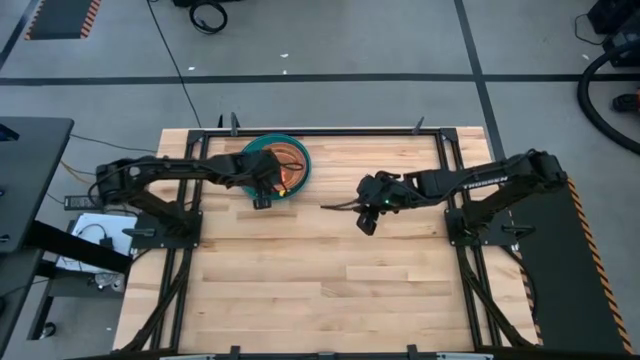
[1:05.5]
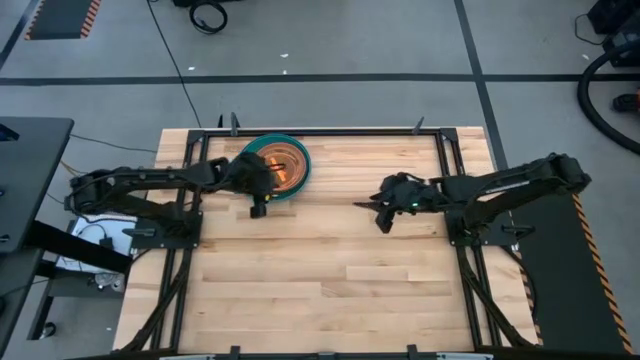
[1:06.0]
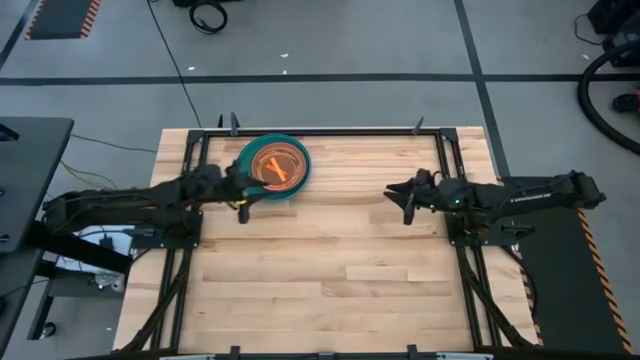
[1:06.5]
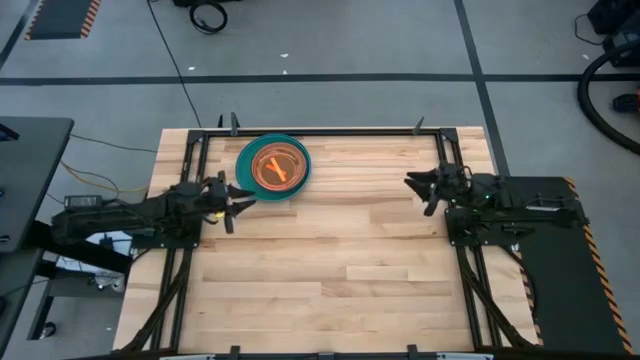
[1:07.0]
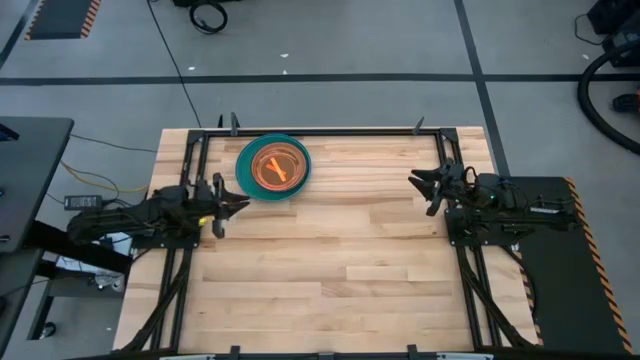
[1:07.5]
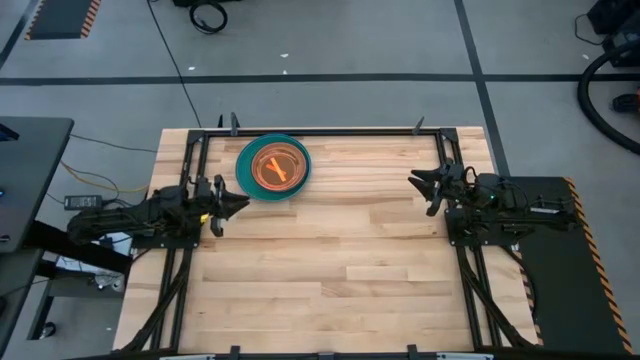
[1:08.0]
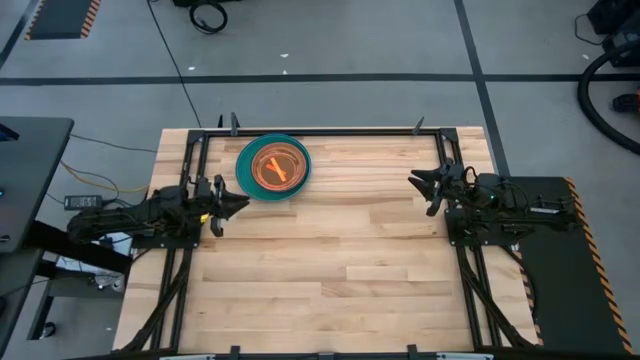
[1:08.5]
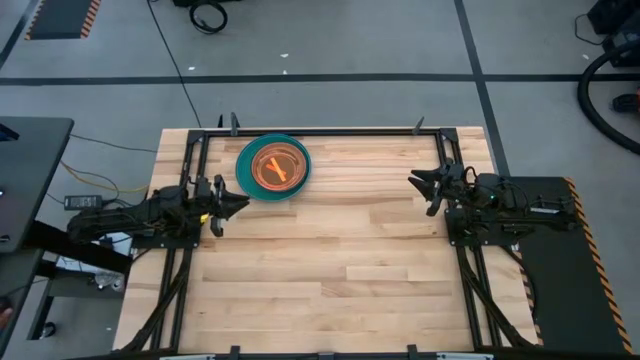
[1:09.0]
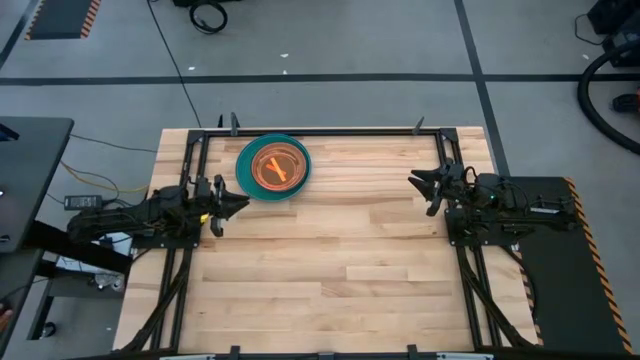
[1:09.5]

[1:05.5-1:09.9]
Task: Stack plastic plates
Return to Home Position

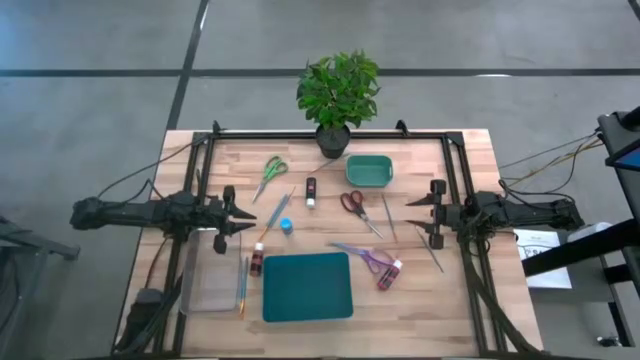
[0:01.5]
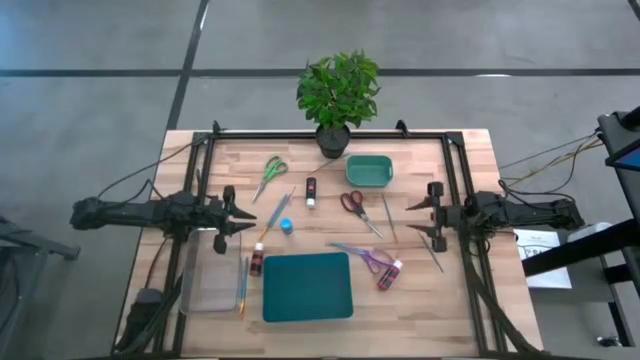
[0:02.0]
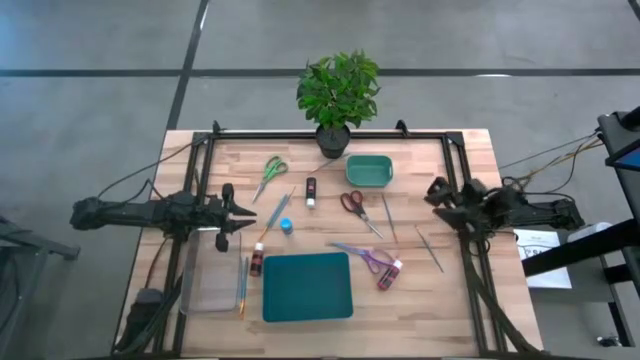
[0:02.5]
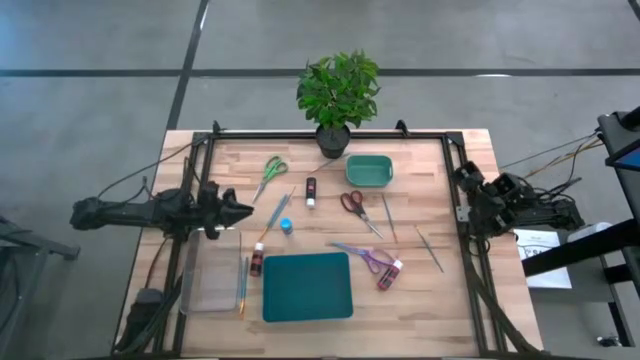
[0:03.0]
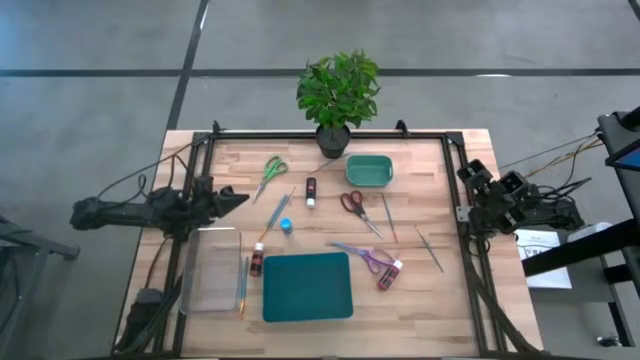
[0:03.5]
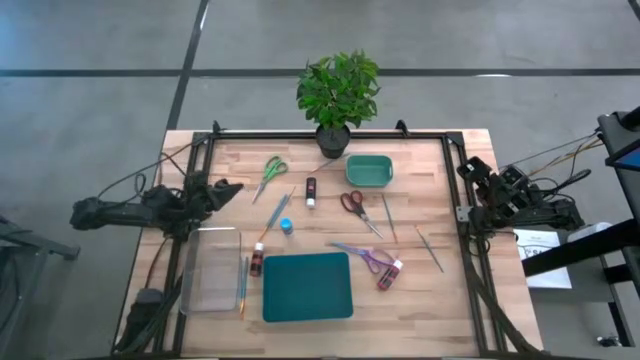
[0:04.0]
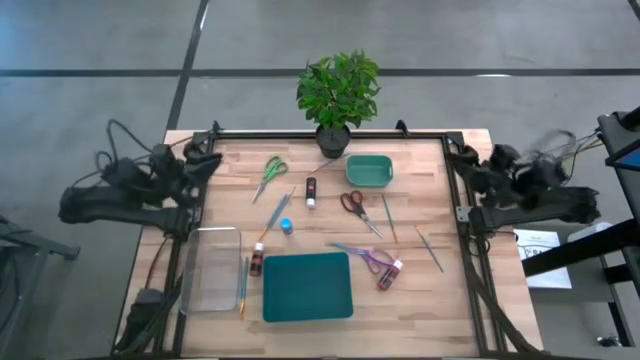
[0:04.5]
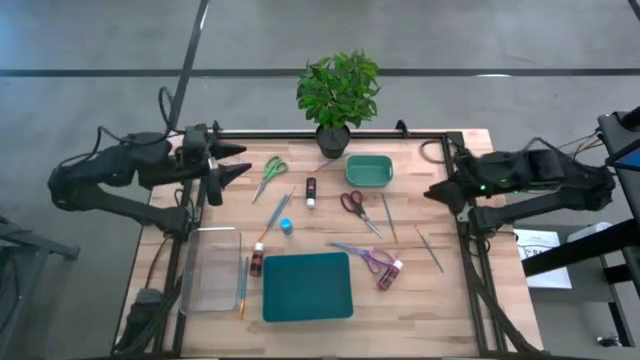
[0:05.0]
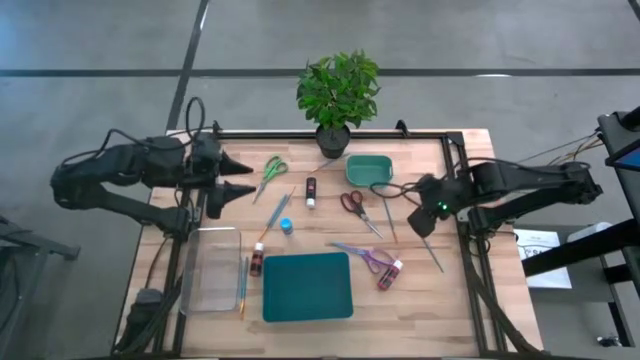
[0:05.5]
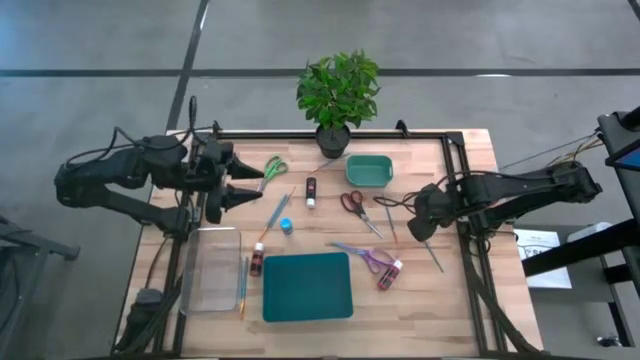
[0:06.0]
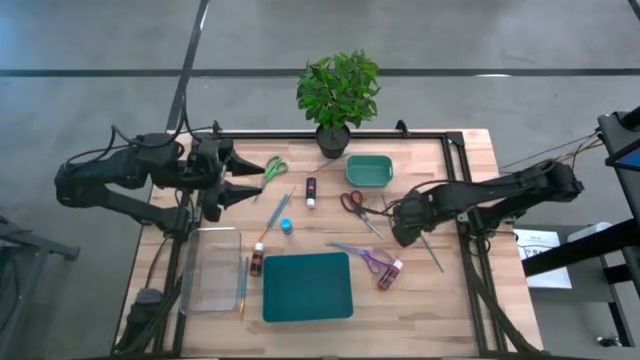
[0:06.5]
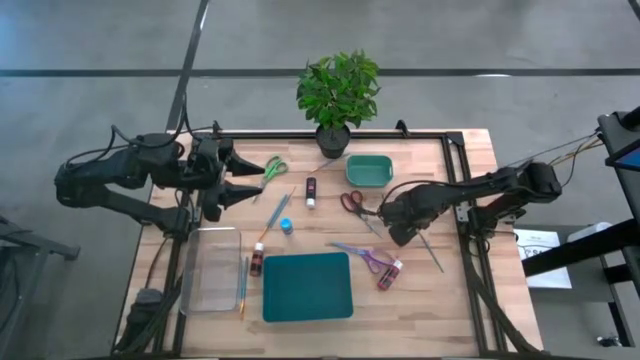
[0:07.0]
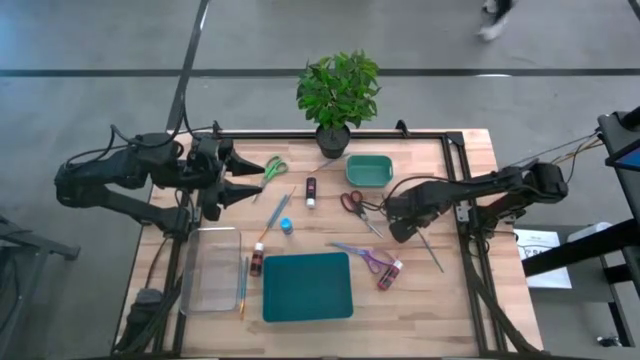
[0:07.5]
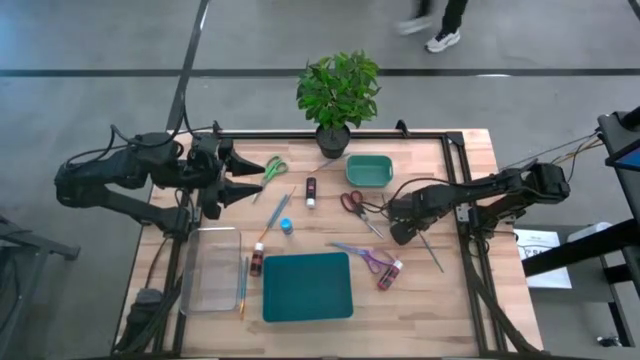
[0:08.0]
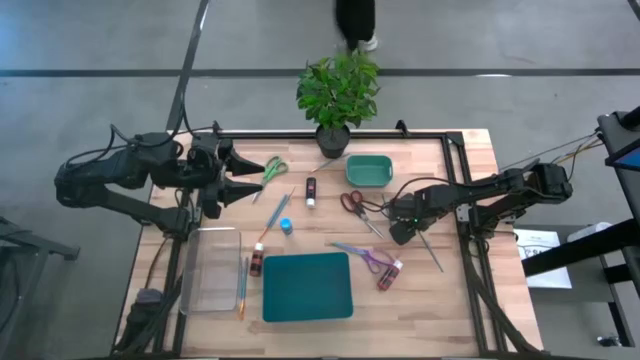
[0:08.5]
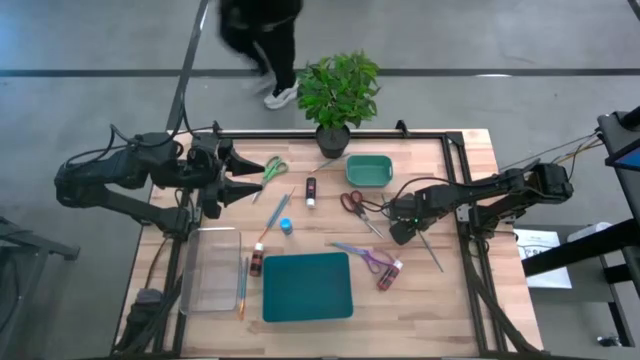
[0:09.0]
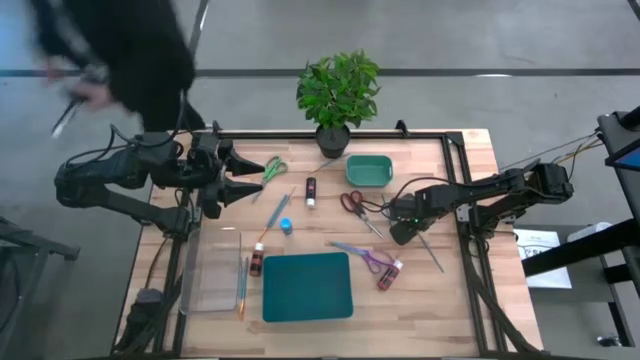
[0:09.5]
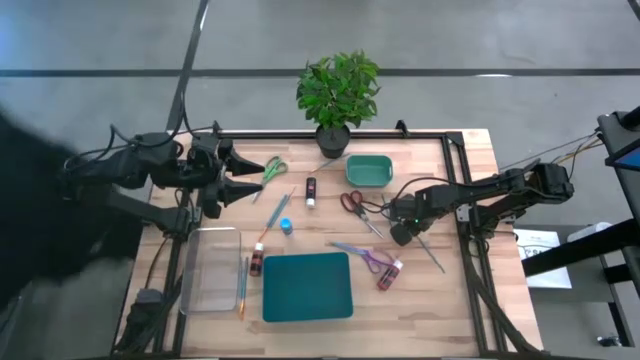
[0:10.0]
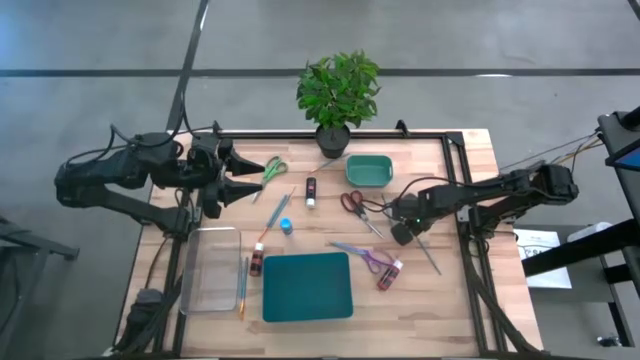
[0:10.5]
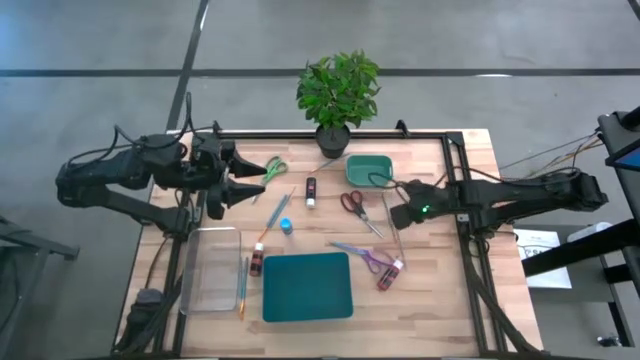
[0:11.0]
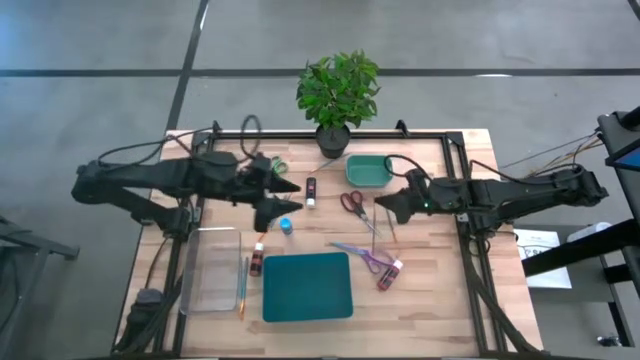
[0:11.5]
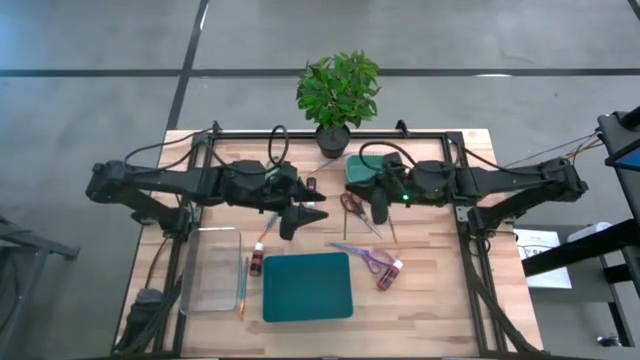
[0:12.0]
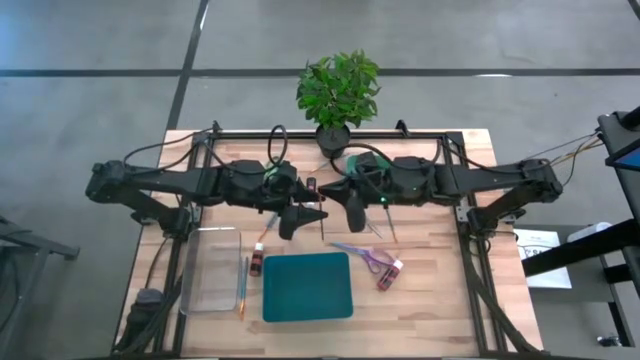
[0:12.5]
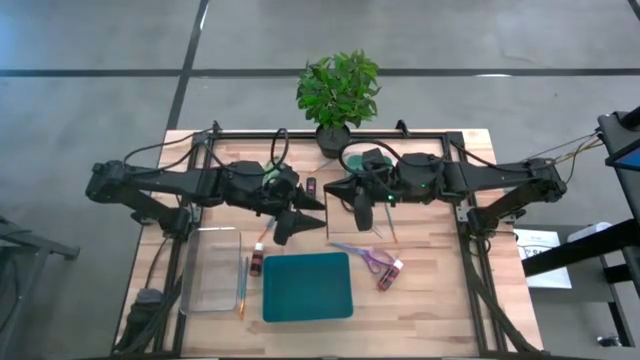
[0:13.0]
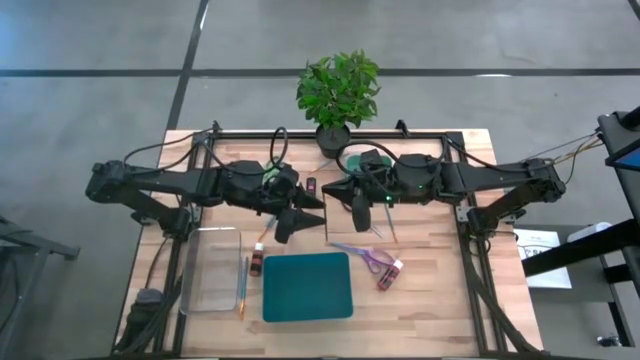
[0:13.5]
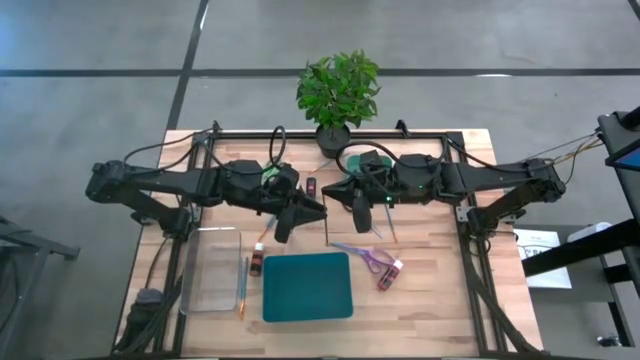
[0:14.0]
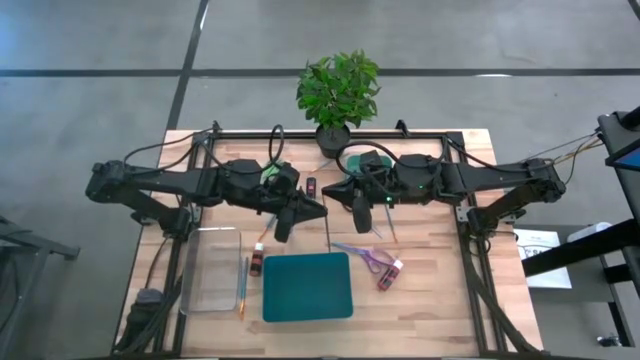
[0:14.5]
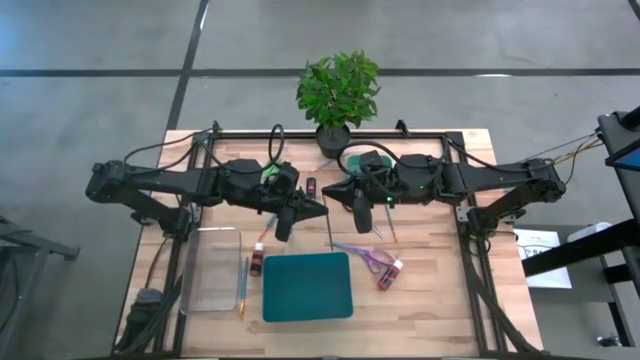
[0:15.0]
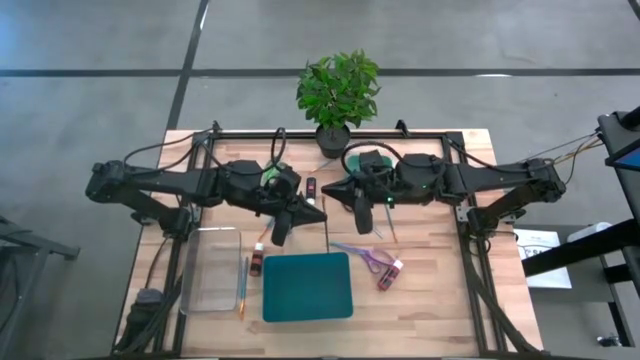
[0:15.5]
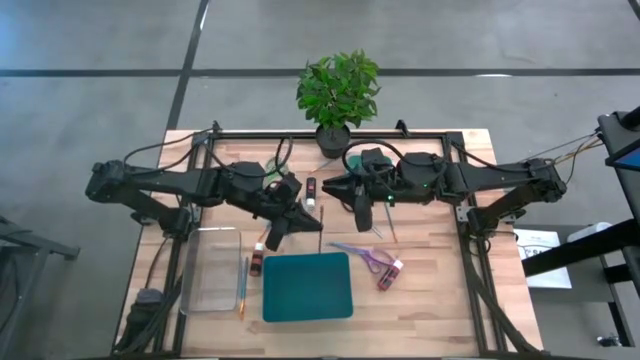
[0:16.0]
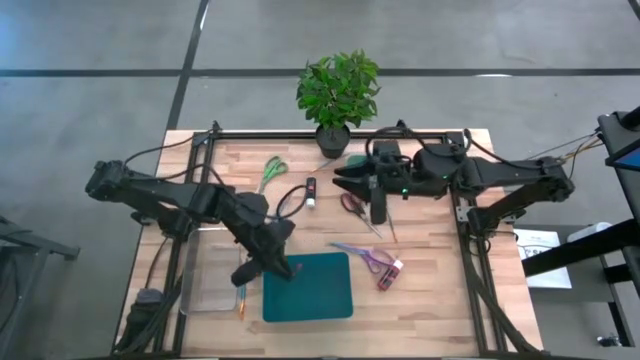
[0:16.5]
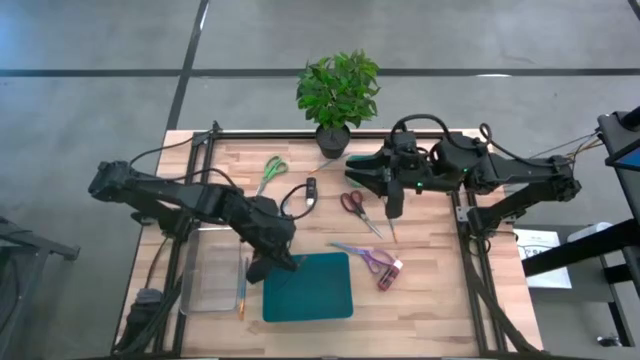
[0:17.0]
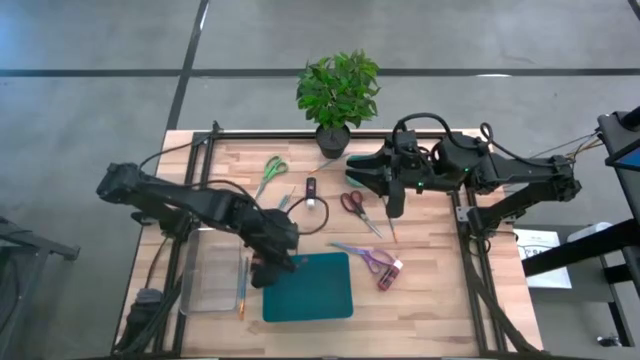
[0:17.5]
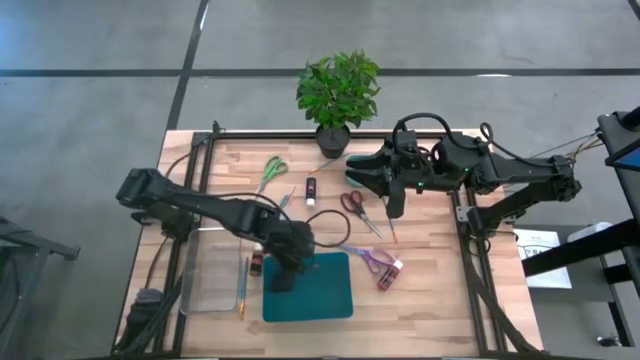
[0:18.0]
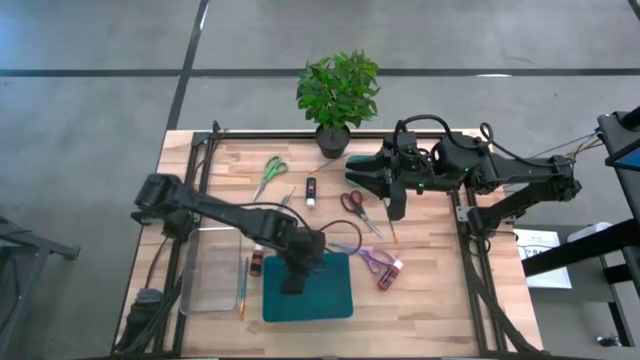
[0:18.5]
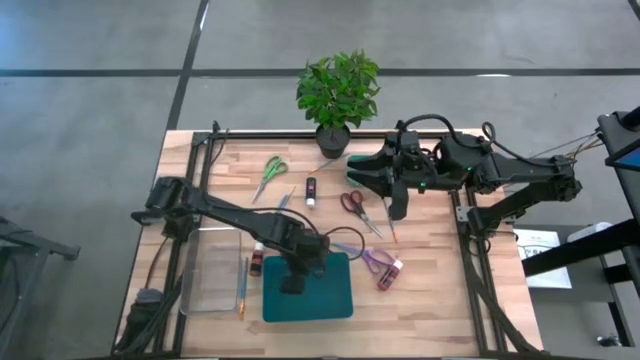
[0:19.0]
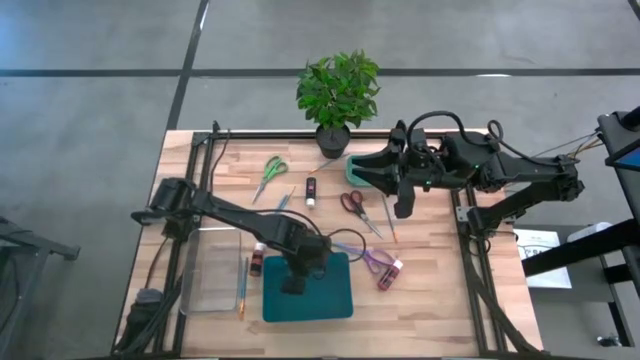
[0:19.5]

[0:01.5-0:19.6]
Task: Pick & Place Paint Supplies
Put the blue paint brush into the blue bin
